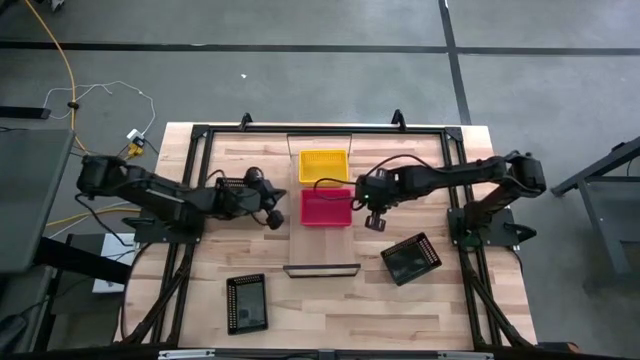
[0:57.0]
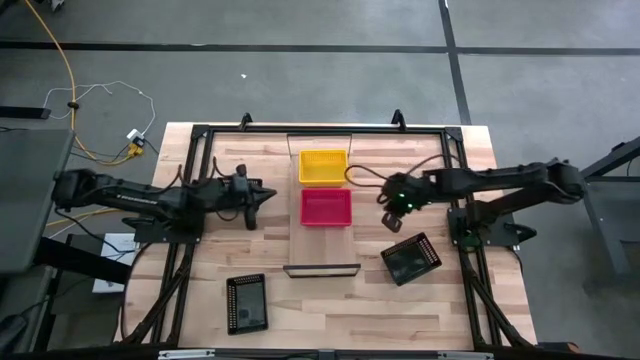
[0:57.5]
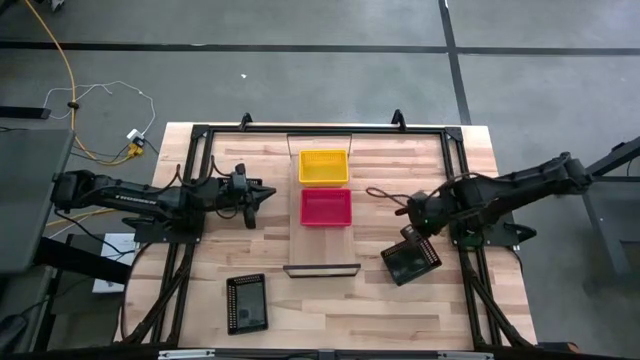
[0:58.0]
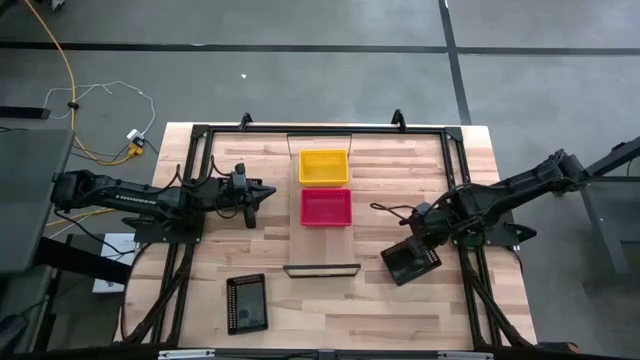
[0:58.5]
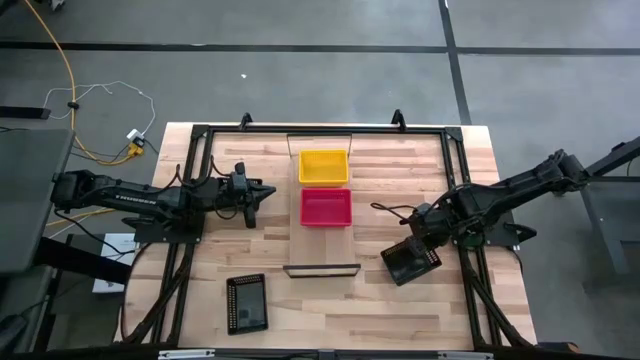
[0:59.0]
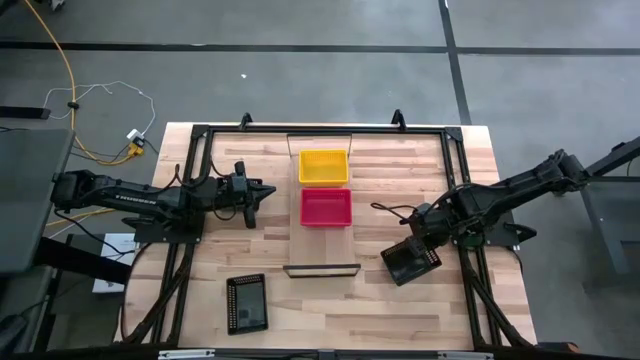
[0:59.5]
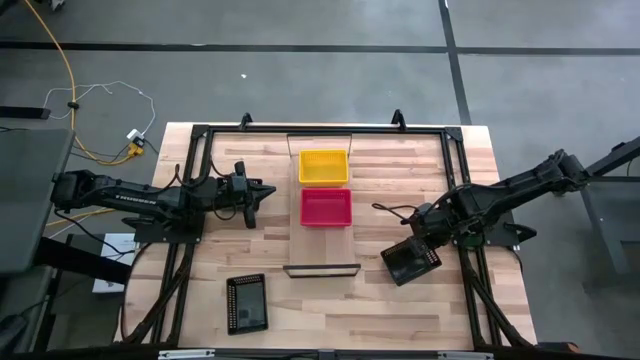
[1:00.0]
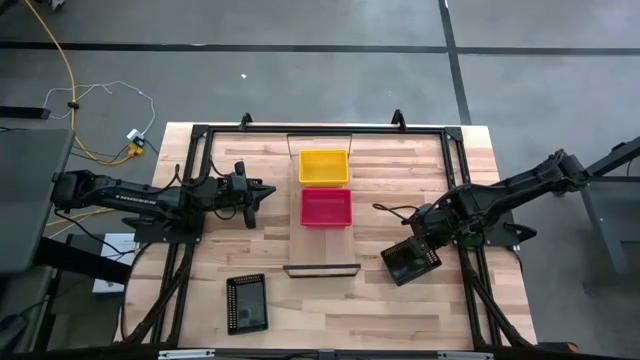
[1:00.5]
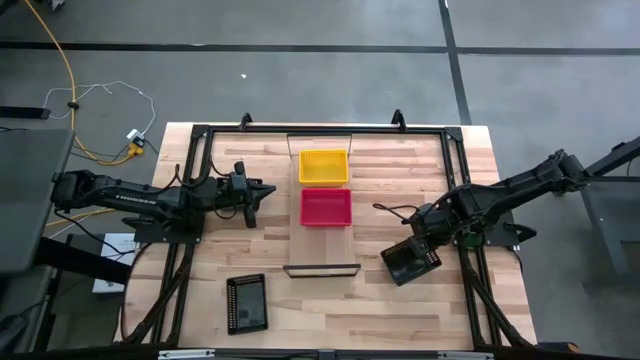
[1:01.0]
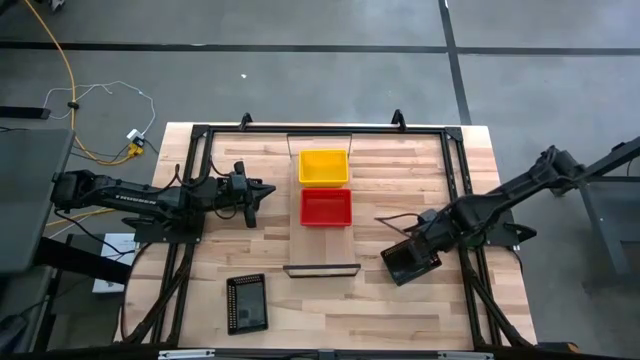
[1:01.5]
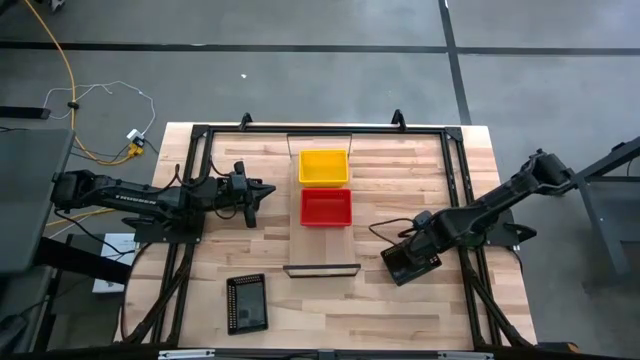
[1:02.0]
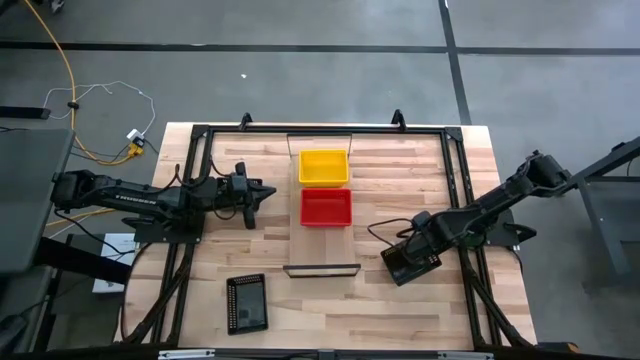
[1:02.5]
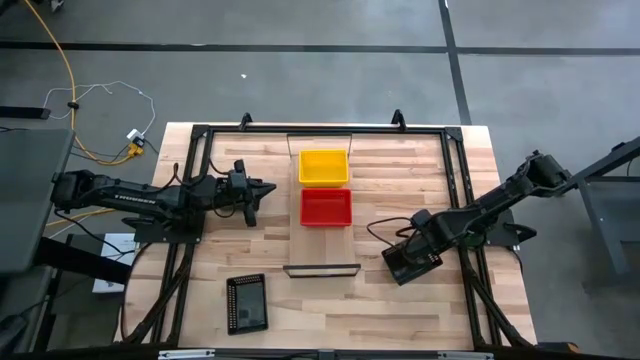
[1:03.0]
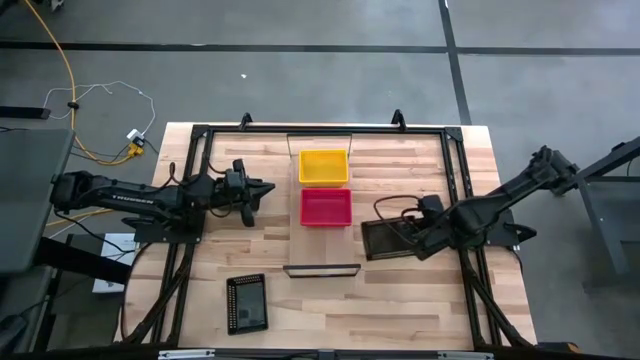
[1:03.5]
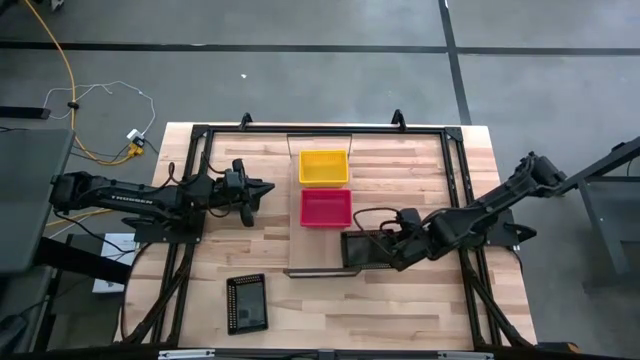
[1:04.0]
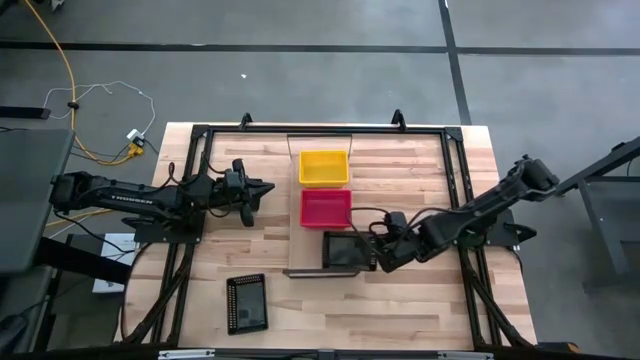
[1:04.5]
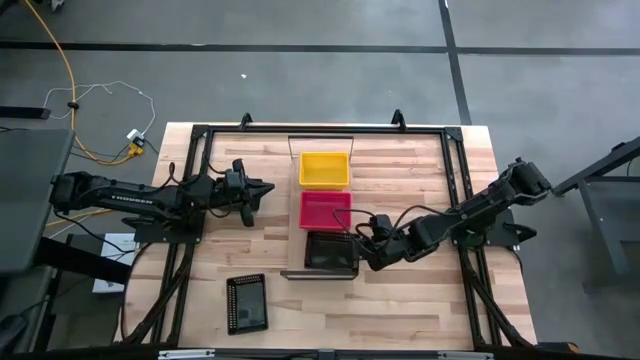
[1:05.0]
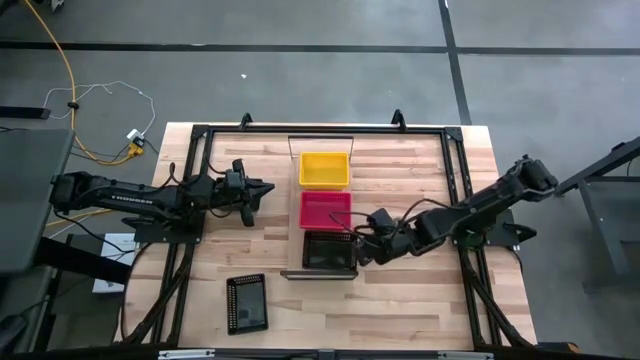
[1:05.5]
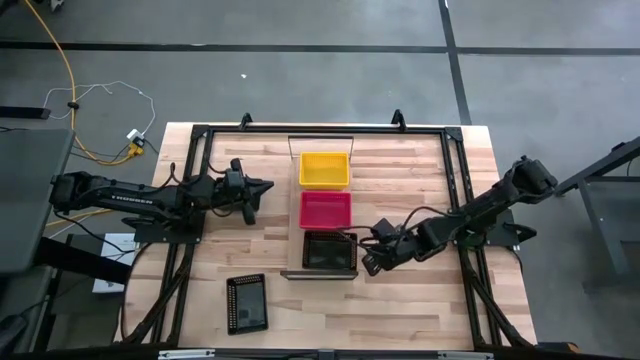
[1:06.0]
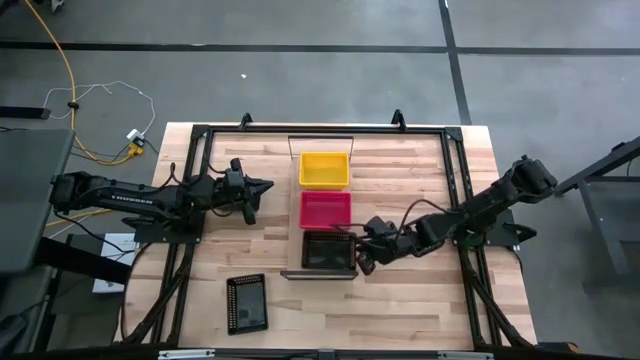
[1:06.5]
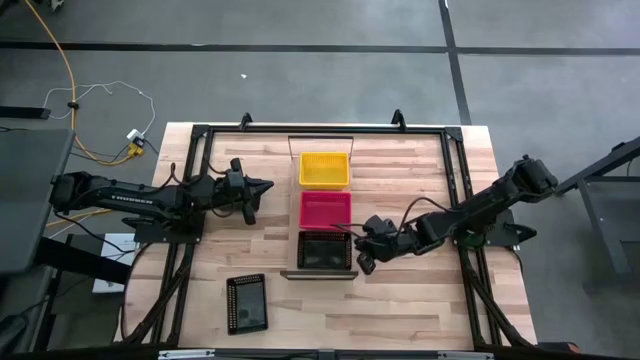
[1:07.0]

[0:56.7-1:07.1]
Task: Stack baskets on shelf by color
Put the right black bin on the shelf

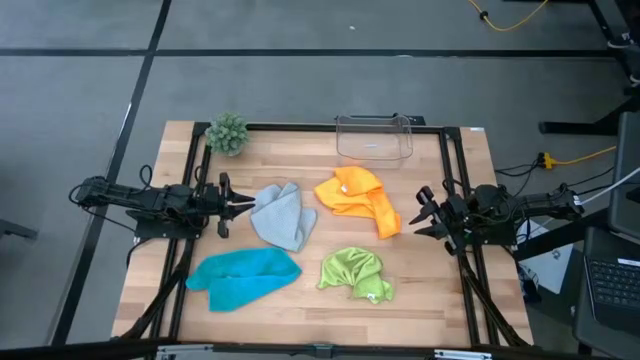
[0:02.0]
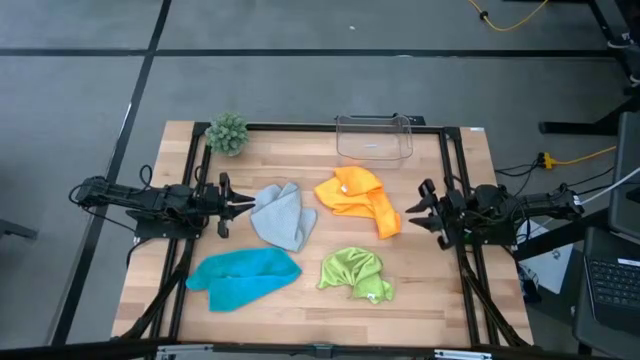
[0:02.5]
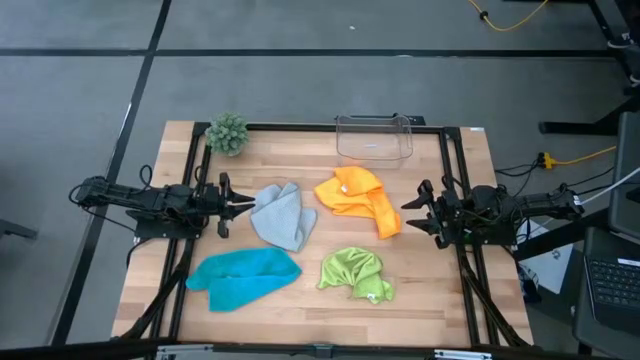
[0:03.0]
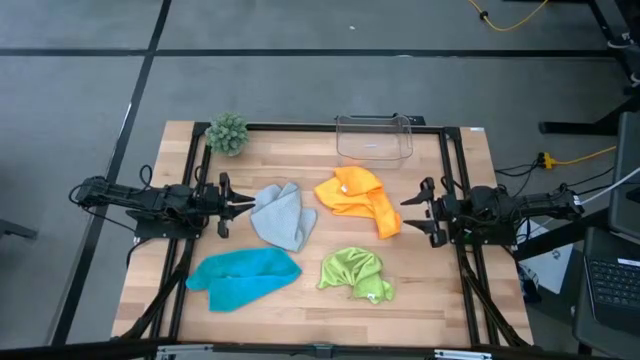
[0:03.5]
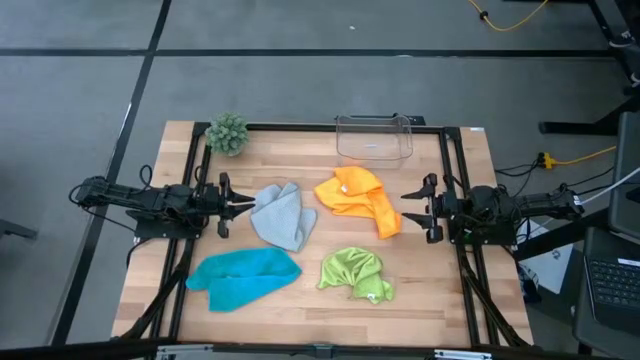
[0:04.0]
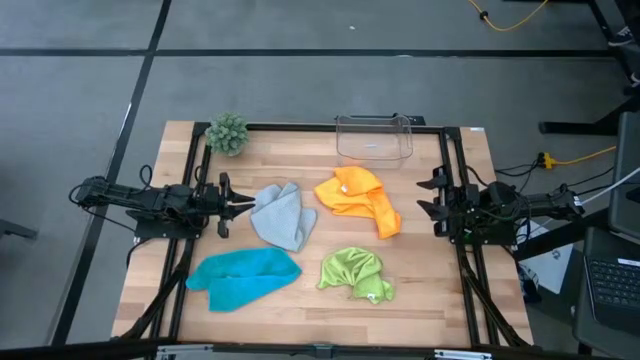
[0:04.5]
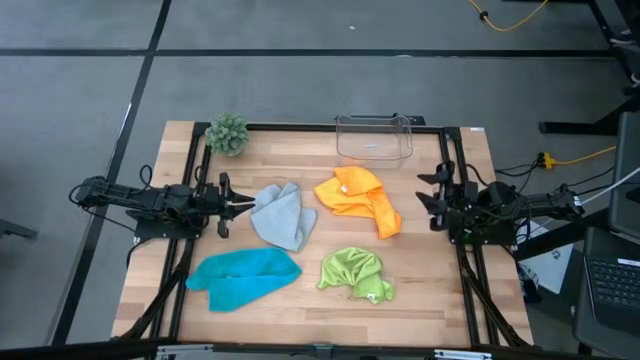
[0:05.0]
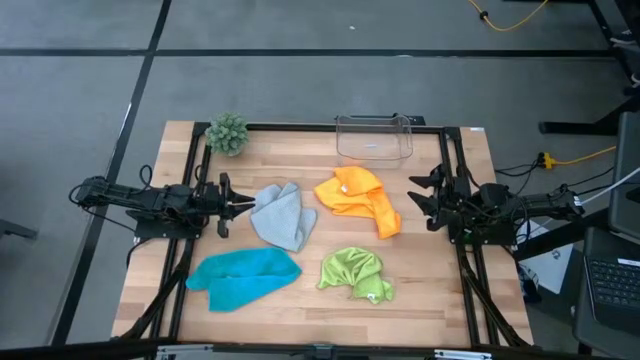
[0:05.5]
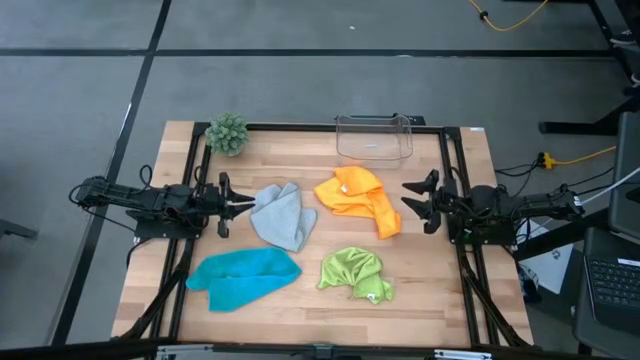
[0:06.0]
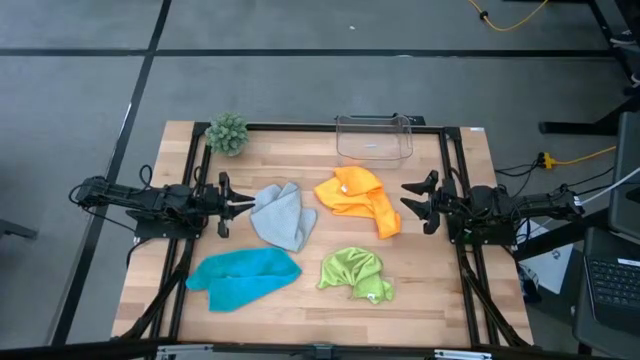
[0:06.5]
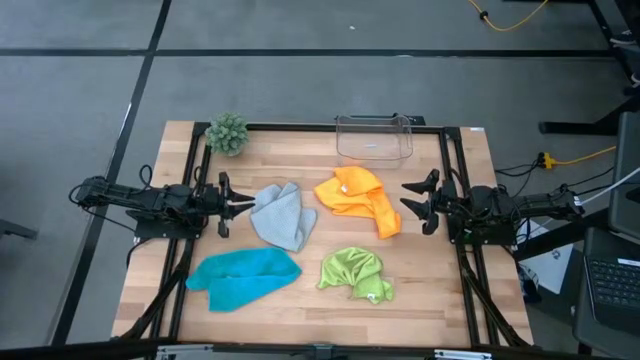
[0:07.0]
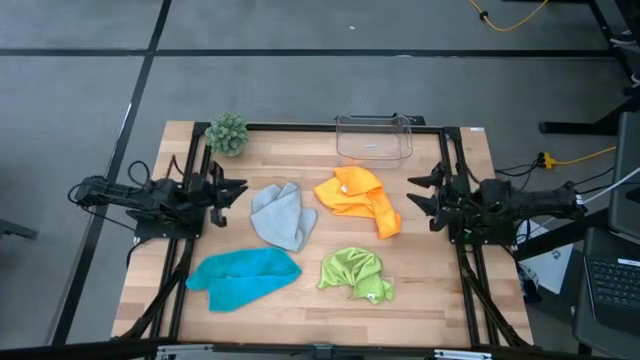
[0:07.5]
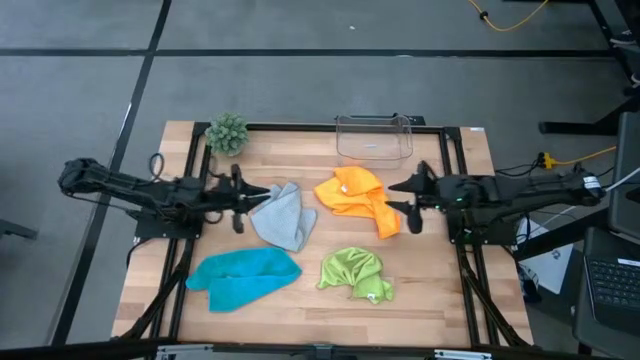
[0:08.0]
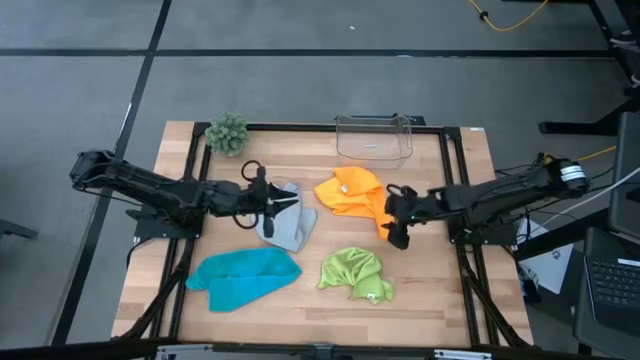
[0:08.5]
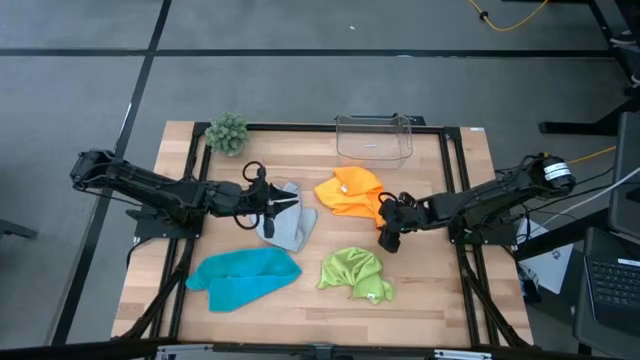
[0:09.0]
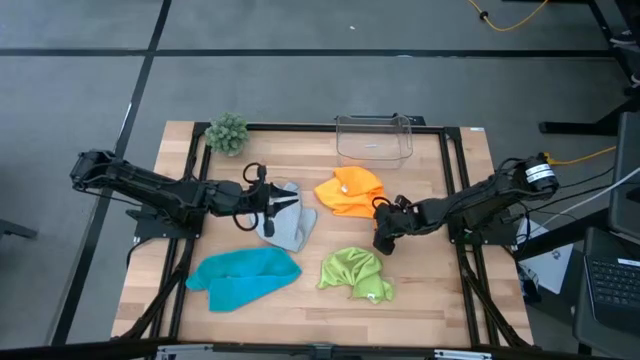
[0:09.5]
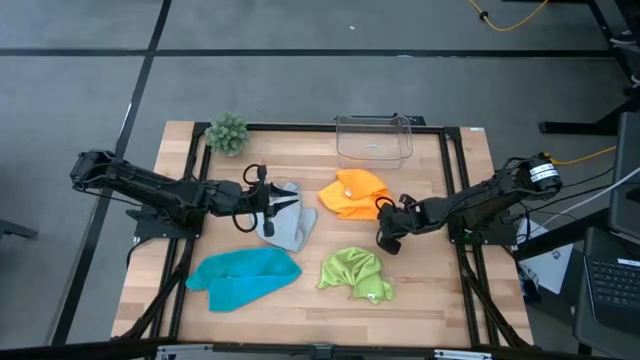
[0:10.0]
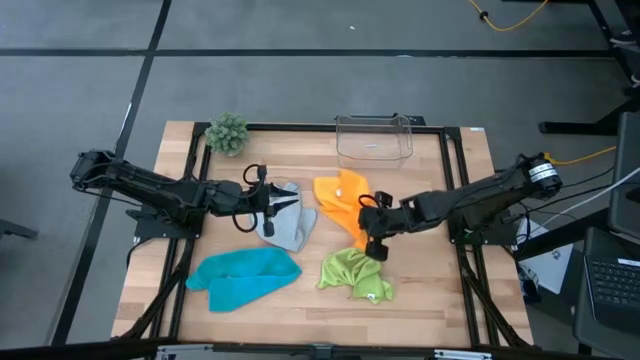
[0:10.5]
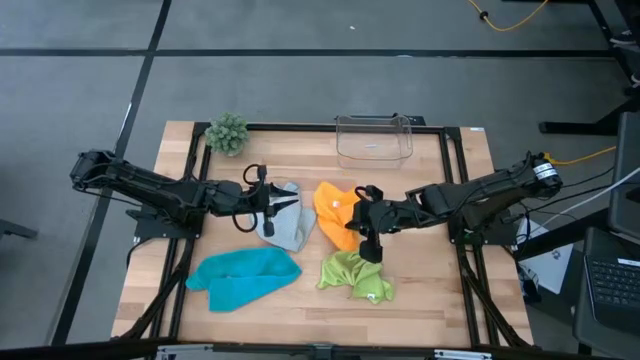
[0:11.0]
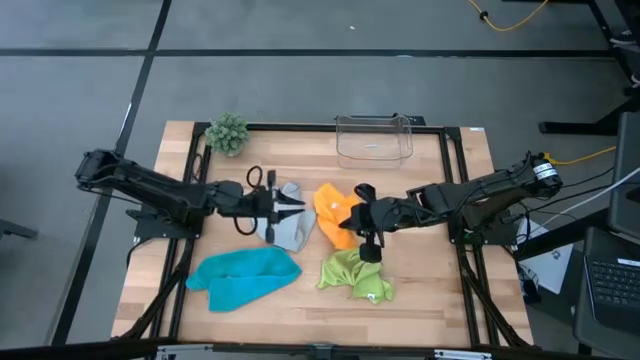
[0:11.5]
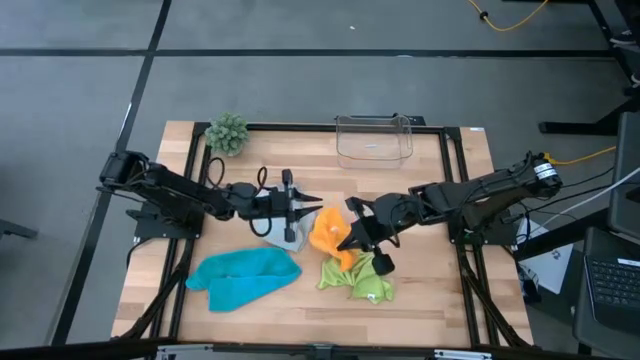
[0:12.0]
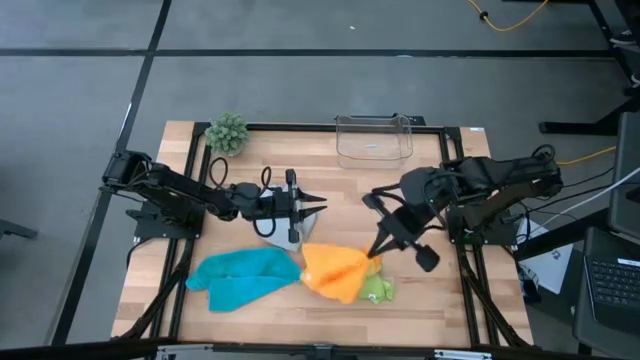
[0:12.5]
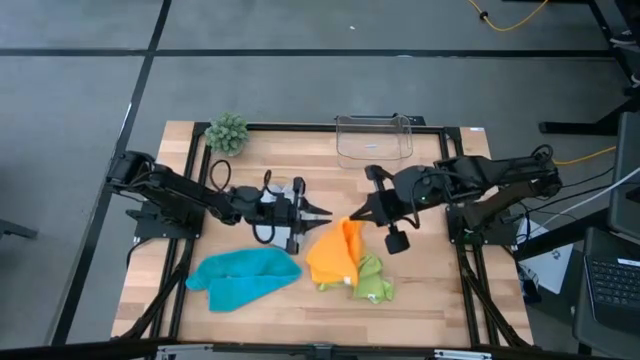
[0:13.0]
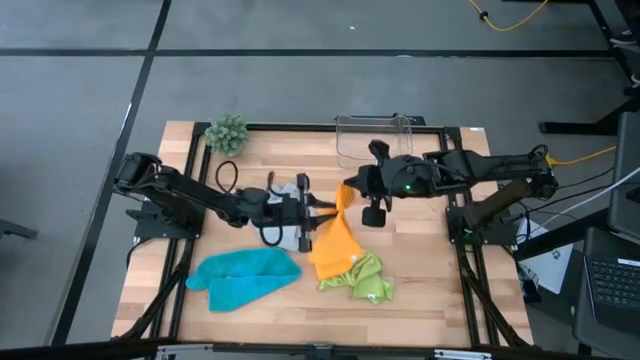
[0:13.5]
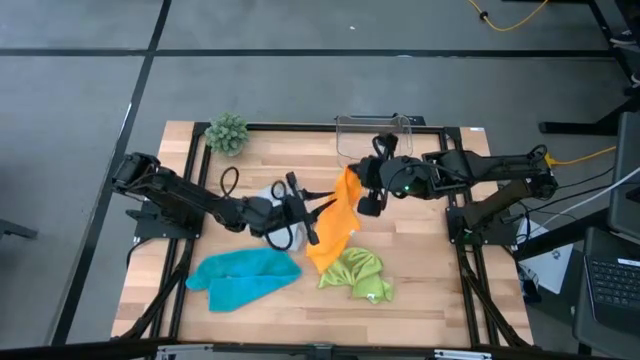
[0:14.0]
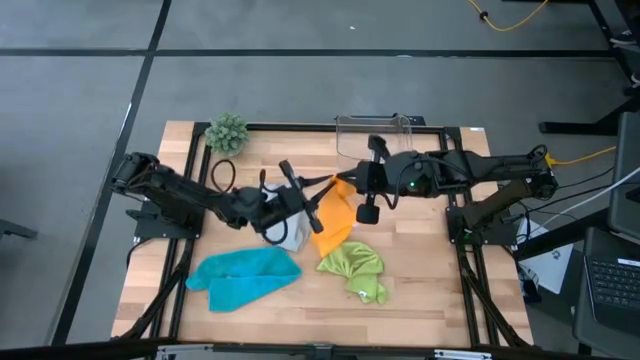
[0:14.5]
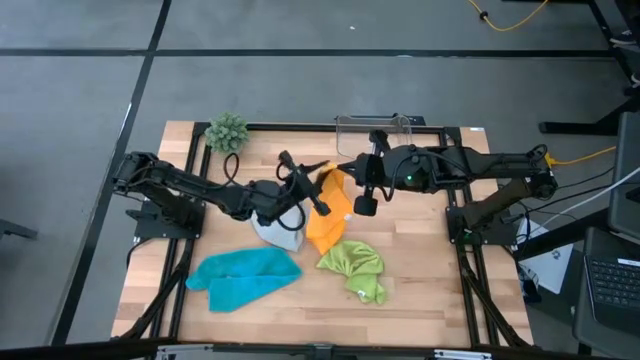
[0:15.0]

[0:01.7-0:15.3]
Task: Fold microfiber towels
Fold the orange microfiber cloth
